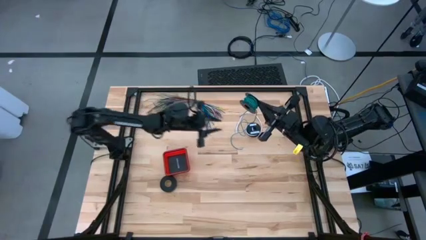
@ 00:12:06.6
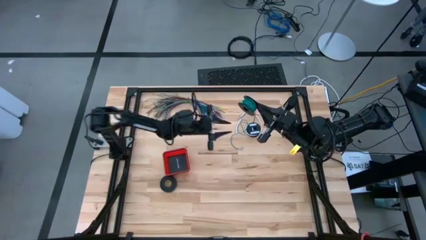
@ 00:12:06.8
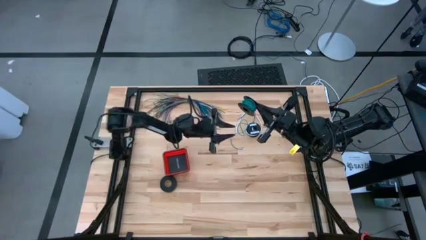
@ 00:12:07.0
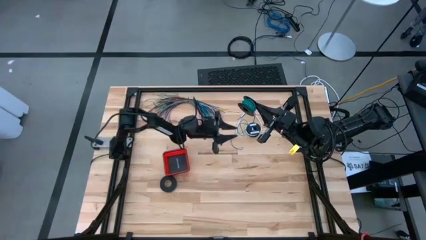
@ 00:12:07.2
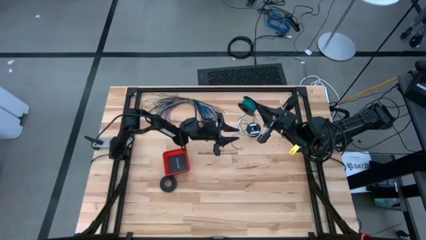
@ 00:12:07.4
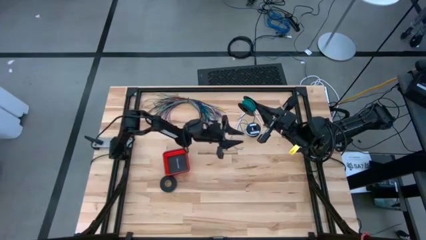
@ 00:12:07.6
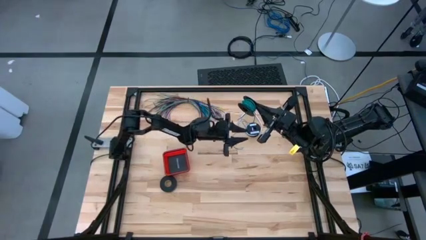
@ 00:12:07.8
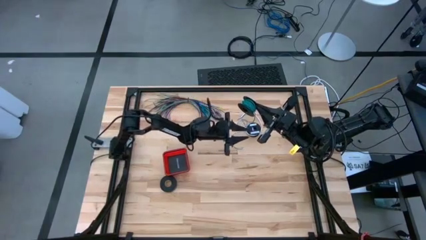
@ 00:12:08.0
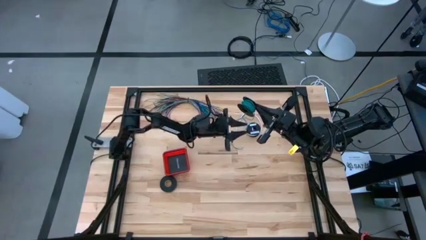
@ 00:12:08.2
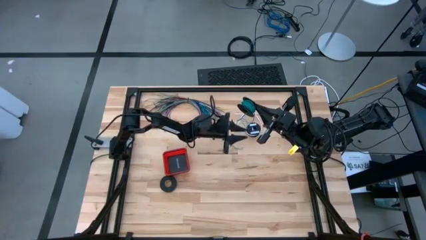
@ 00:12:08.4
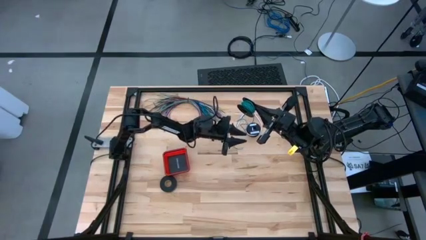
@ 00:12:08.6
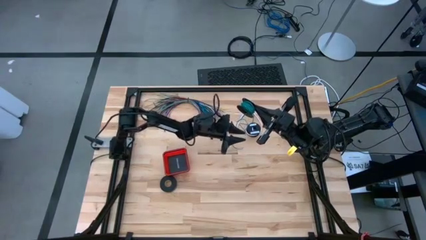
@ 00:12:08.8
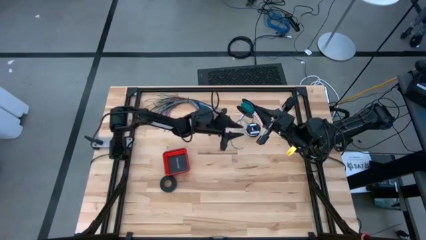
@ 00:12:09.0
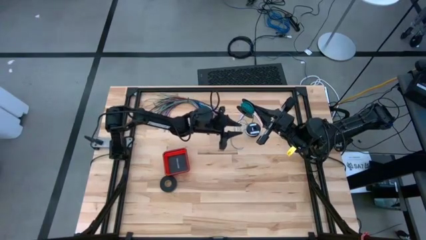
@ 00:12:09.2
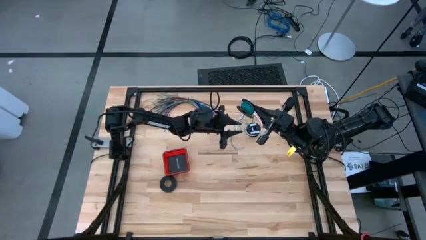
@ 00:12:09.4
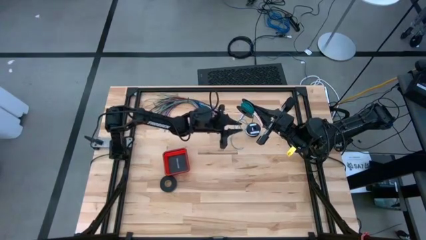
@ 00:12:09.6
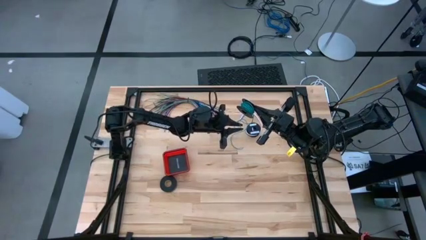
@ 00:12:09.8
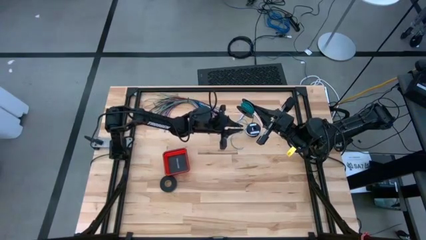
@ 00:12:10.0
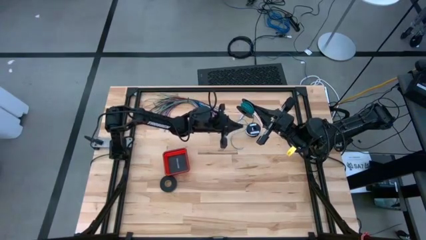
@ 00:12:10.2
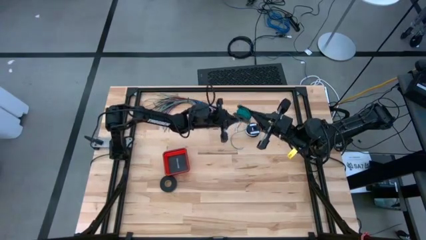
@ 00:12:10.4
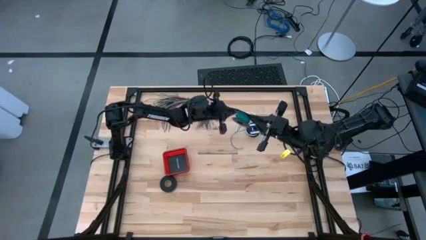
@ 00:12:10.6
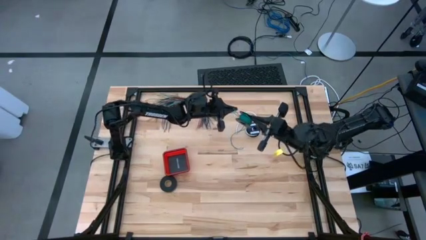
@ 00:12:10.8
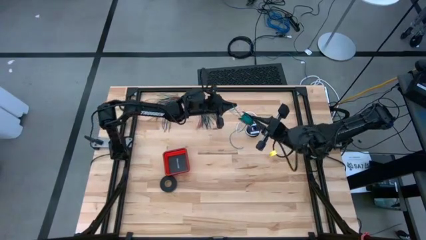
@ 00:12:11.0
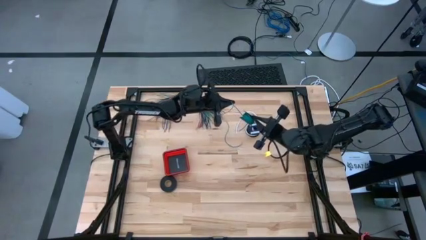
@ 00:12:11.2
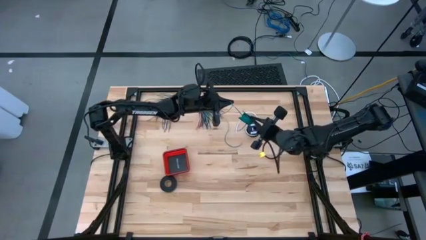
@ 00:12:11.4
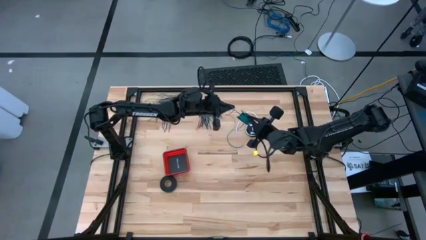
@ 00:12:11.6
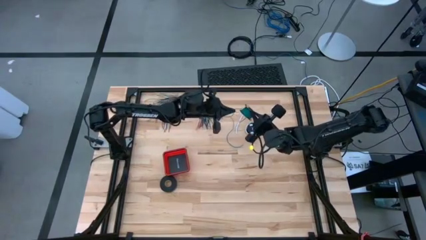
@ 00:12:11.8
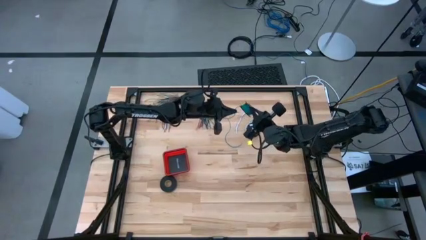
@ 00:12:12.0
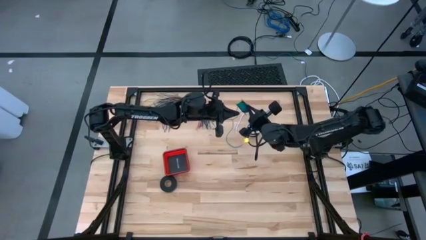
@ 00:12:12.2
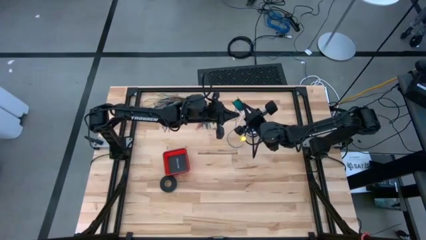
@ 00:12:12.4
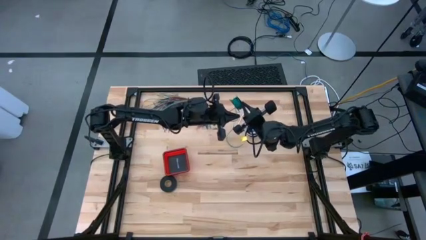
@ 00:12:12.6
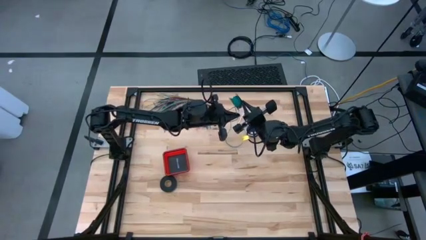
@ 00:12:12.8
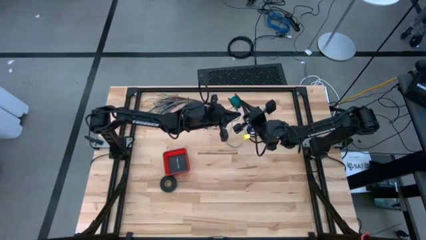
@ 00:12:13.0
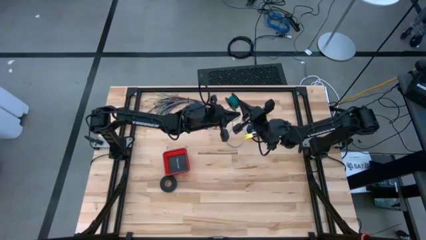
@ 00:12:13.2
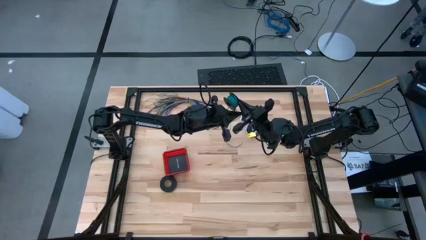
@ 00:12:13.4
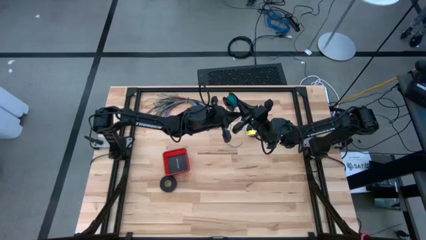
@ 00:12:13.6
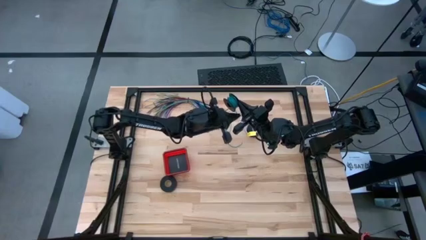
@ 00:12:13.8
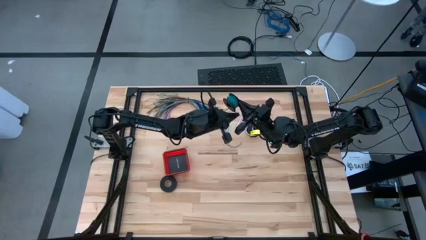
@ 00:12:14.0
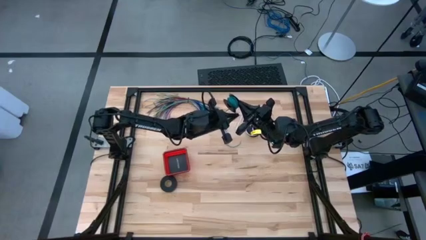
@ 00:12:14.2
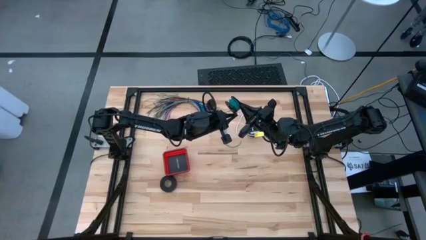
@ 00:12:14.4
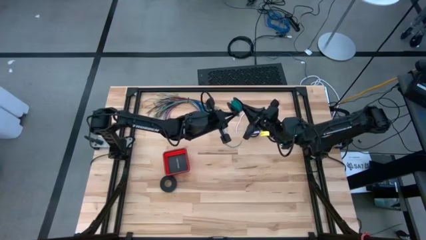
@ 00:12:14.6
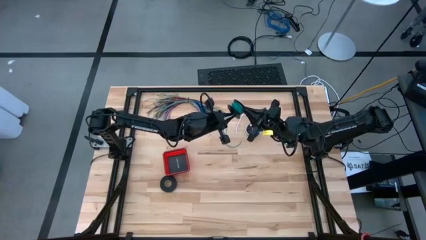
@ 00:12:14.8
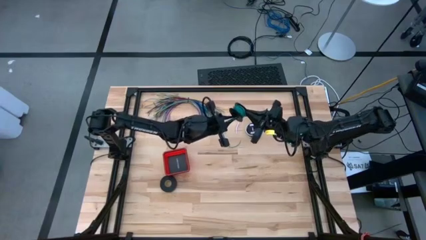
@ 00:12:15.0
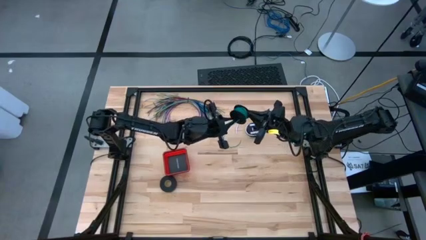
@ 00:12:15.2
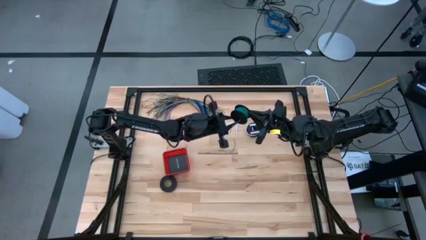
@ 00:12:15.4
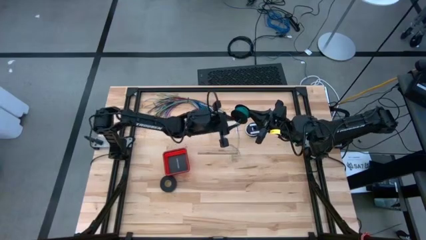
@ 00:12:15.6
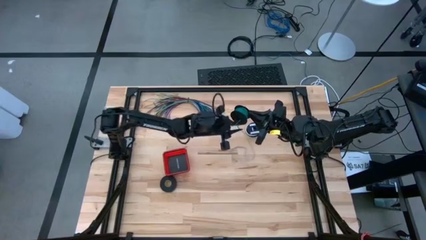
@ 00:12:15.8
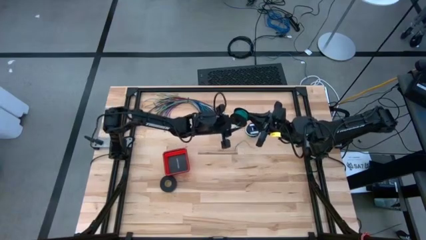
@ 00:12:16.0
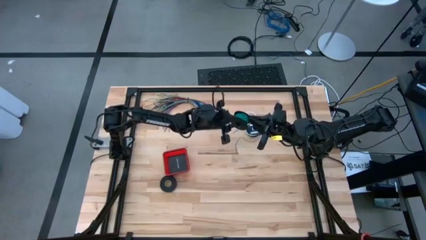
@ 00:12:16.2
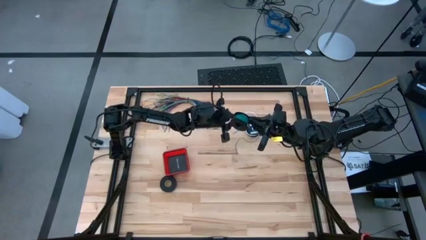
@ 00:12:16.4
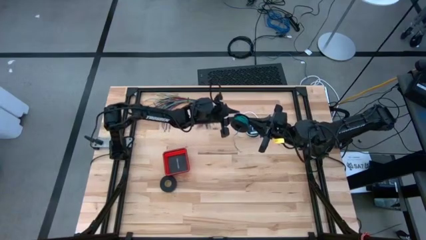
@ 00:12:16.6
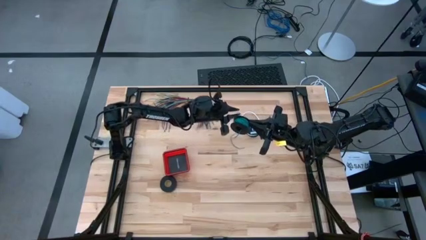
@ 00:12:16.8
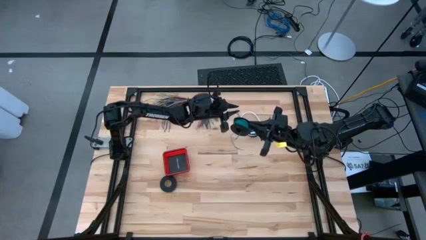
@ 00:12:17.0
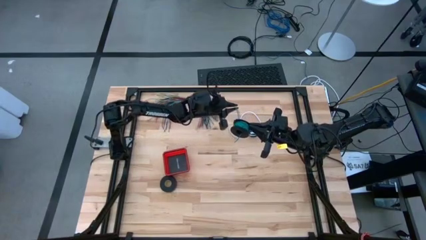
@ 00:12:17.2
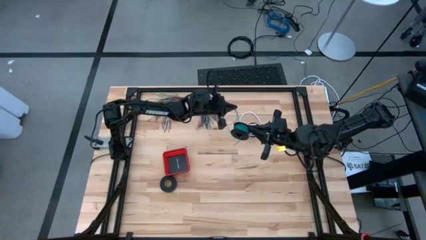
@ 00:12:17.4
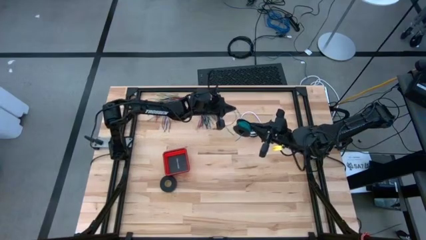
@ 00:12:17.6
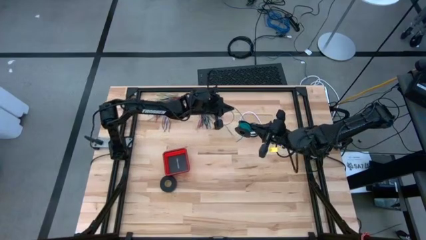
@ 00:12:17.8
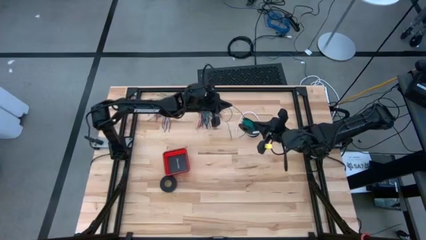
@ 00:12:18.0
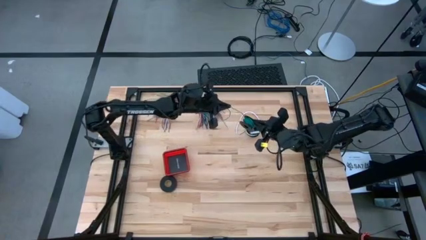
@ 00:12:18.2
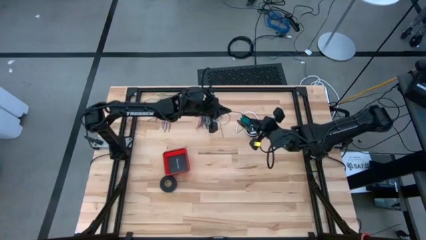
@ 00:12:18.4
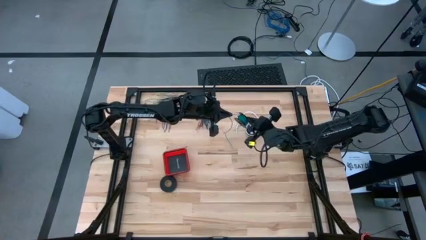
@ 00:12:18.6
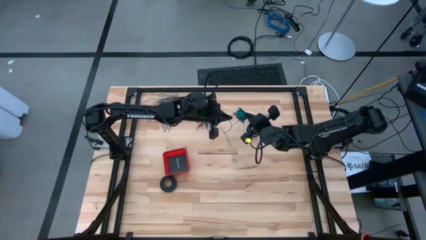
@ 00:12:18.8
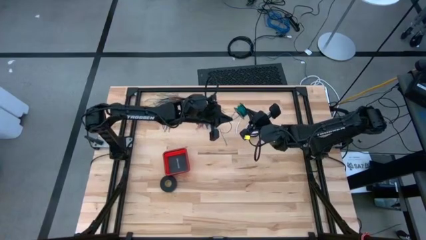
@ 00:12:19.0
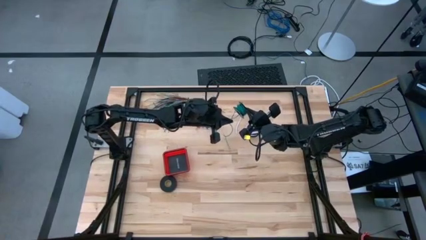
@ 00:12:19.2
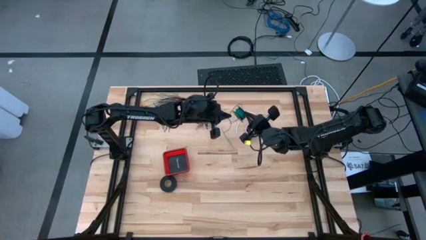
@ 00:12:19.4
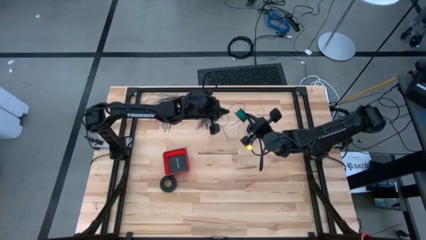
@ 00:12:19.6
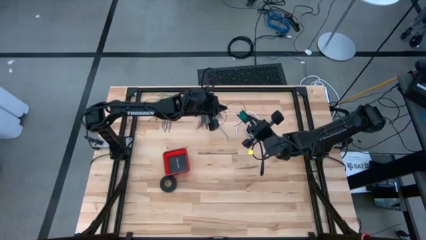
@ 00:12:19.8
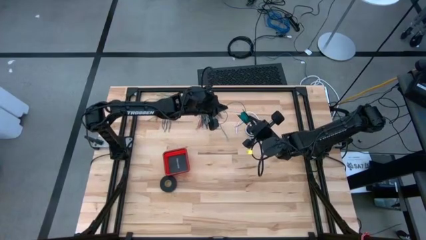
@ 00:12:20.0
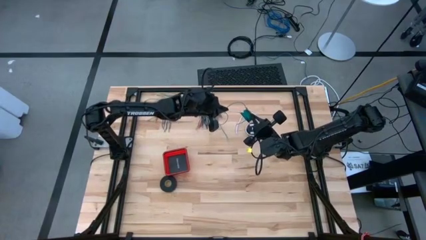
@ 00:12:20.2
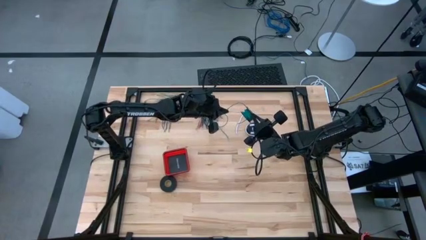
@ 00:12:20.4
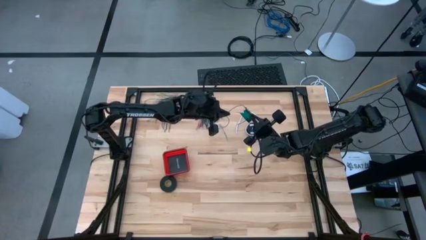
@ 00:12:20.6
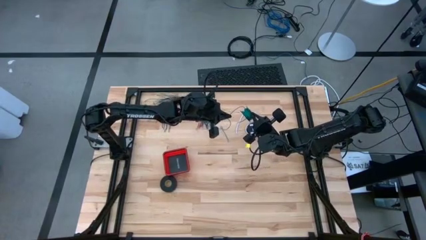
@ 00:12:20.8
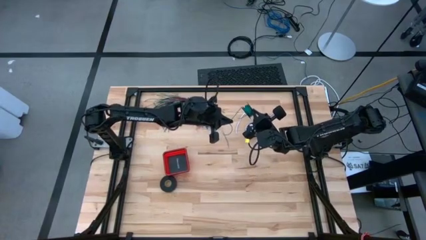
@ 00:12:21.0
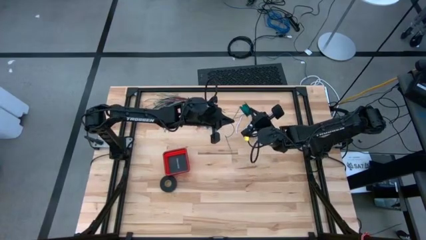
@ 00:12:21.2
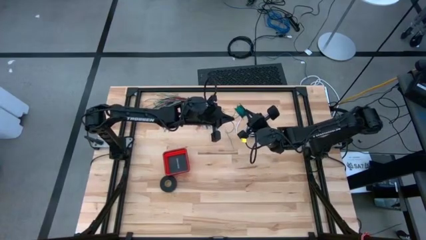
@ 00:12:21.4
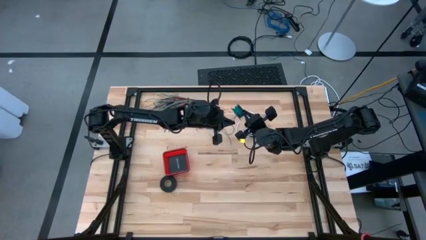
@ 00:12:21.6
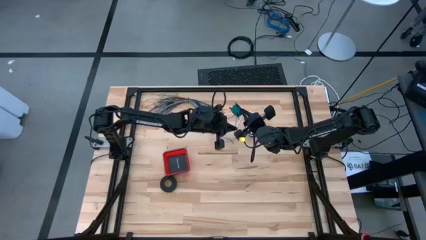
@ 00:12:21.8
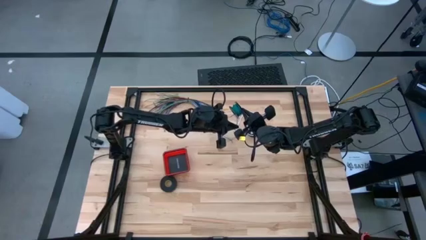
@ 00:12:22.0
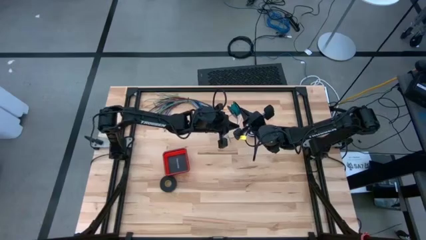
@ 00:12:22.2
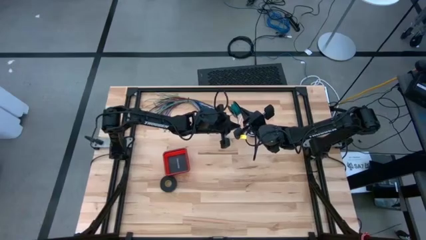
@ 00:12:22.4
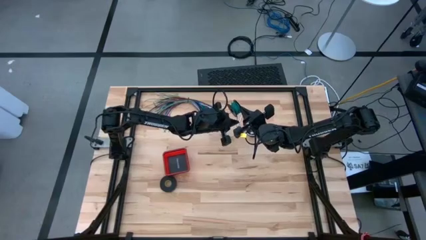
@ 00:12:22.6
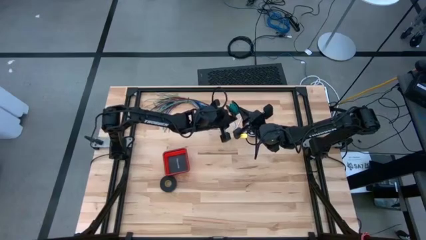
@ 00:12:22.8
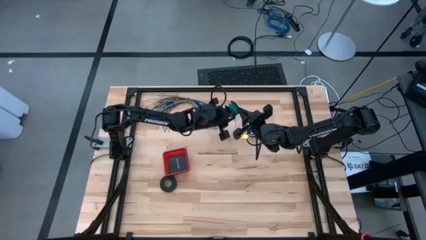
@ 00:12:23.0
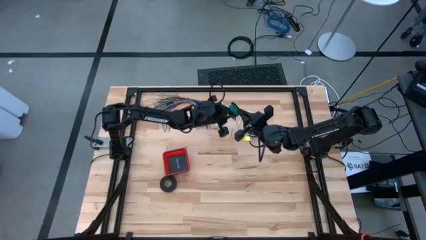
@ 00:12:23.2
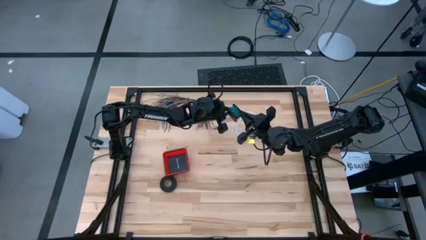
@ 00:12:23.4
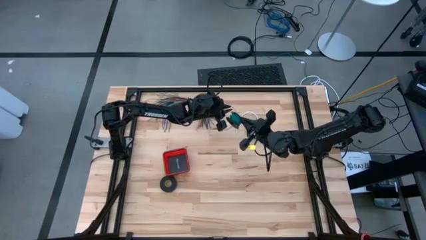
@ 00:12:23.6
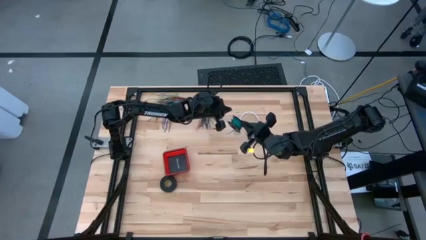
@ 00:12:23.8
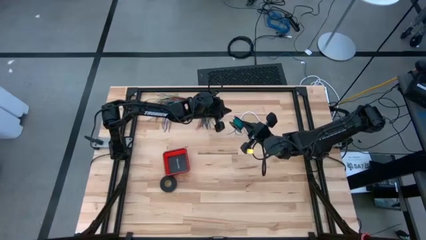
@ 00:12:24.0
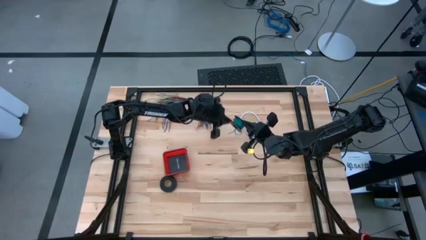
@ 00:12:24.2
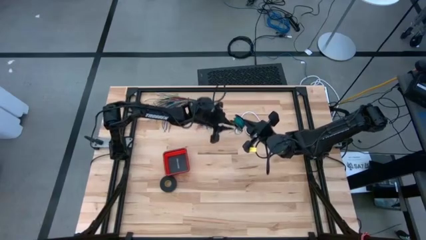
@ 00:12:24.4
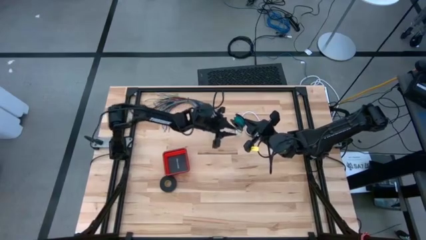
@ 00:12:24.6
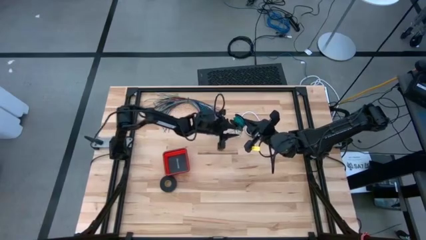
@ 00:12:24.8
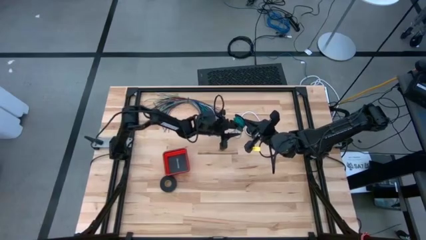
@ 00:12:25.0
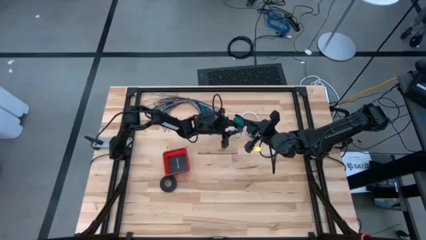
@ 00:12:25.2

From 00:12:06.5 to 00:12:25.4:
Task: Coil cords
Coil the green wire onto the spool
